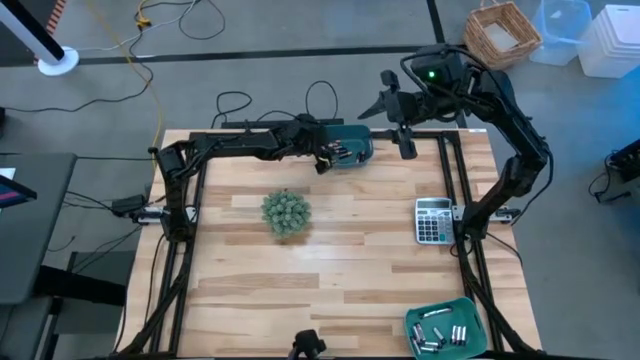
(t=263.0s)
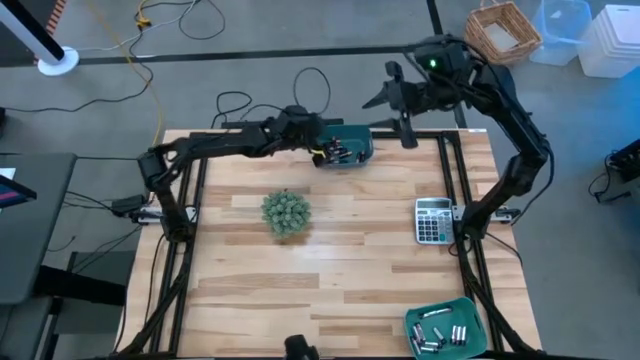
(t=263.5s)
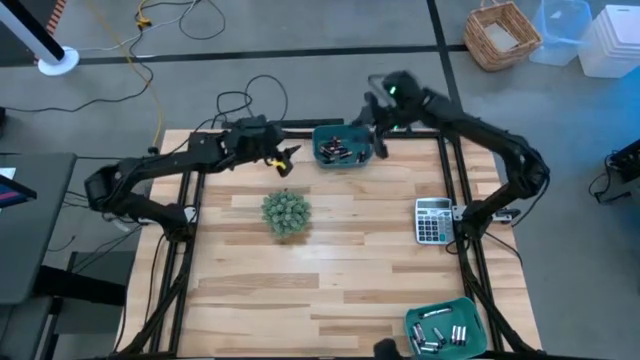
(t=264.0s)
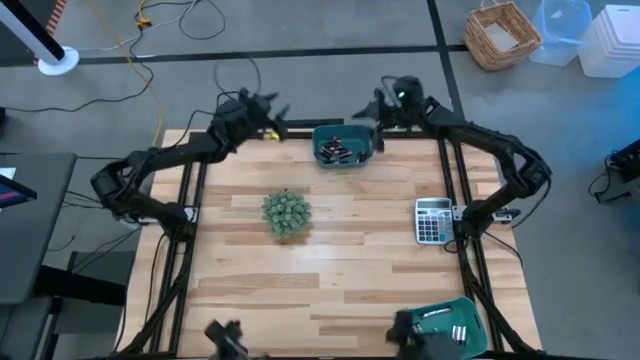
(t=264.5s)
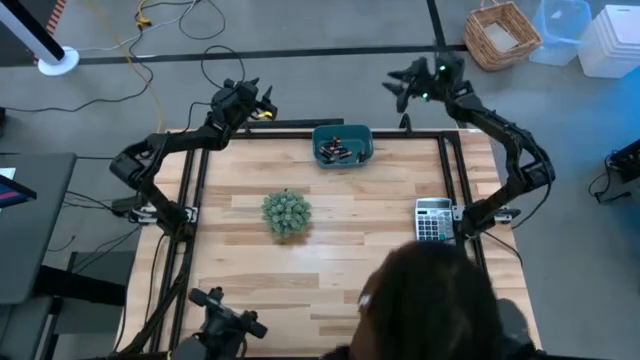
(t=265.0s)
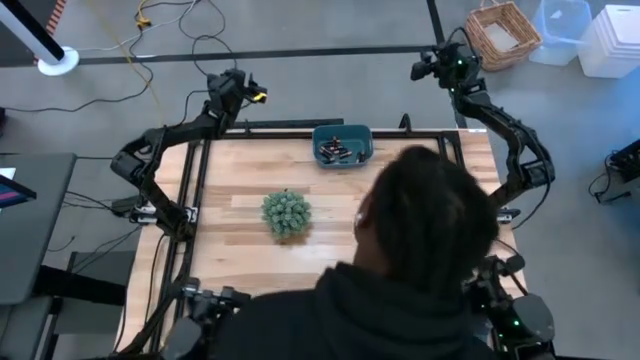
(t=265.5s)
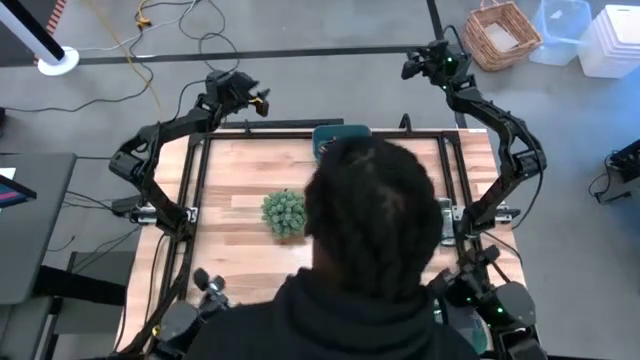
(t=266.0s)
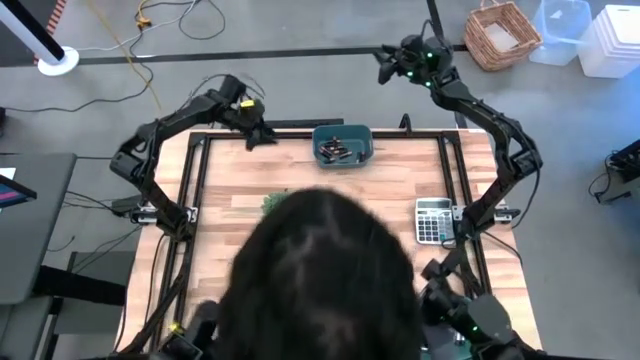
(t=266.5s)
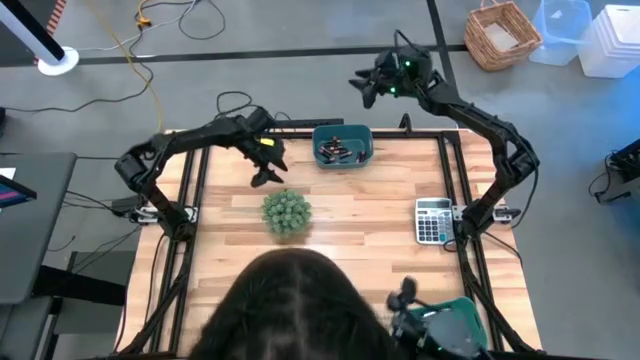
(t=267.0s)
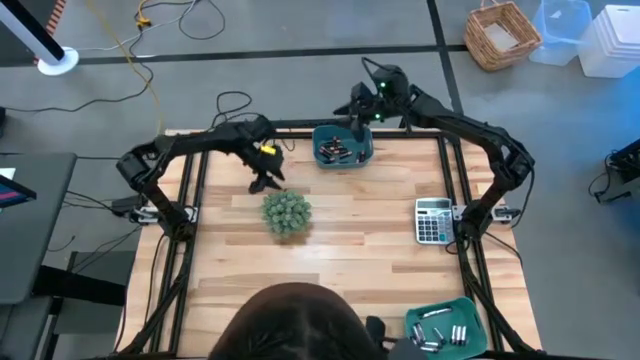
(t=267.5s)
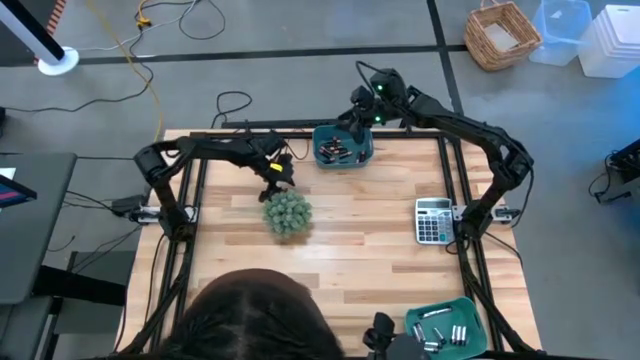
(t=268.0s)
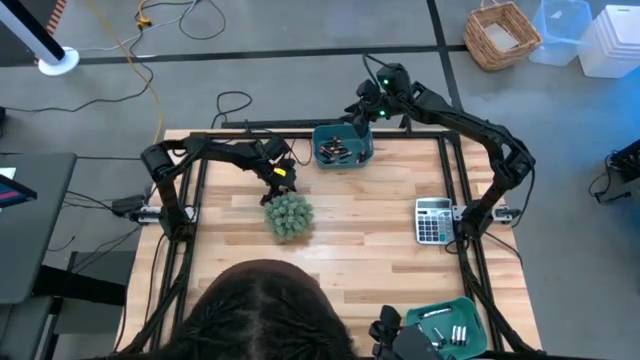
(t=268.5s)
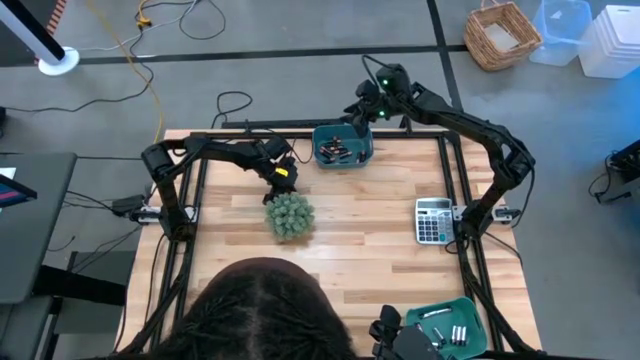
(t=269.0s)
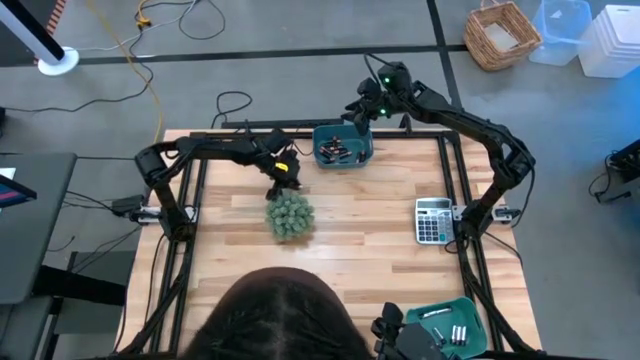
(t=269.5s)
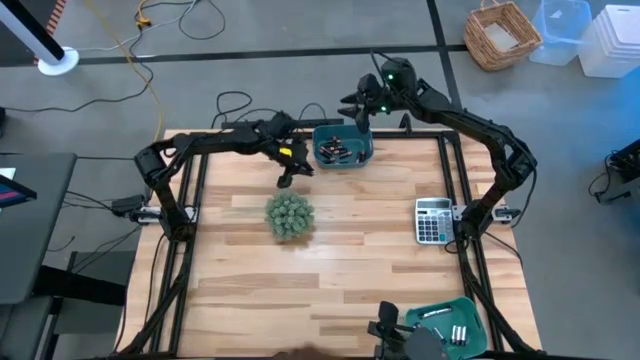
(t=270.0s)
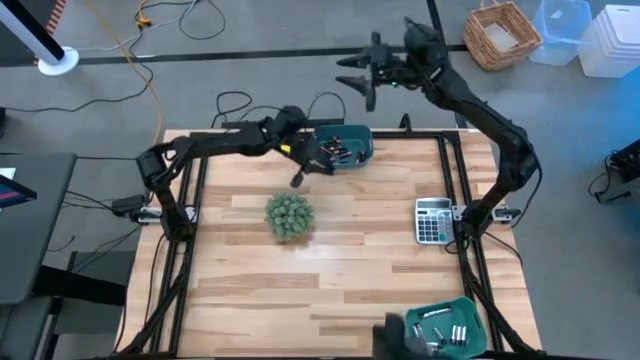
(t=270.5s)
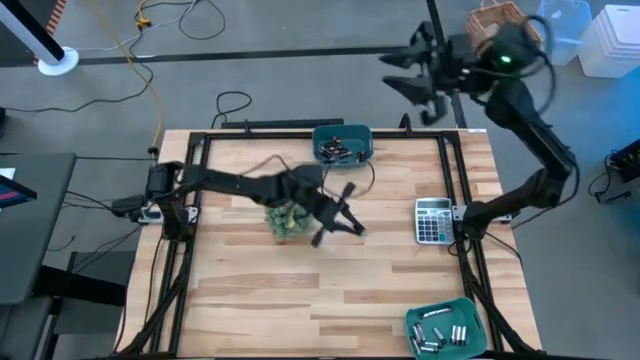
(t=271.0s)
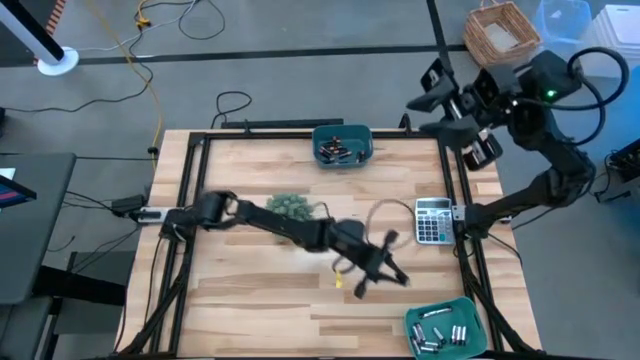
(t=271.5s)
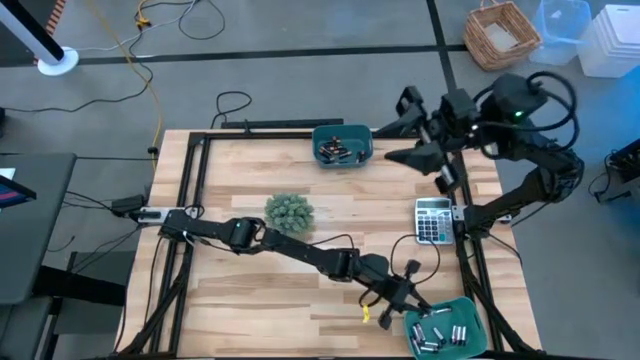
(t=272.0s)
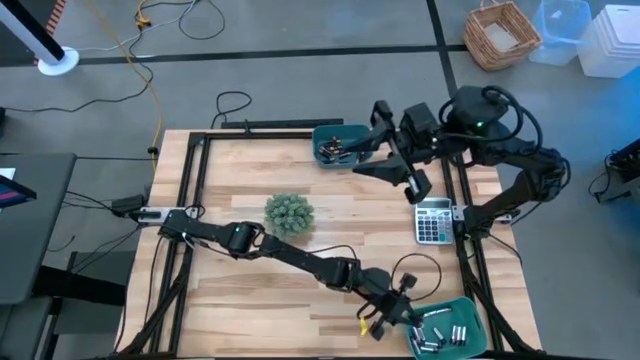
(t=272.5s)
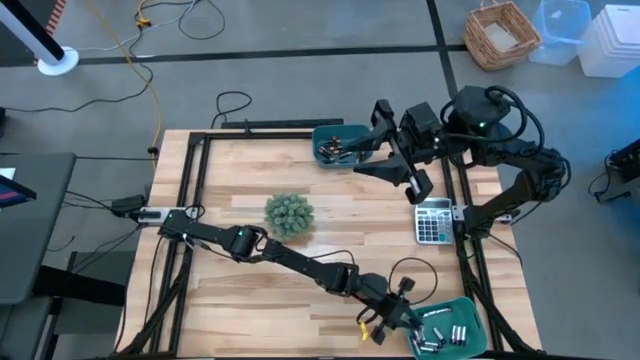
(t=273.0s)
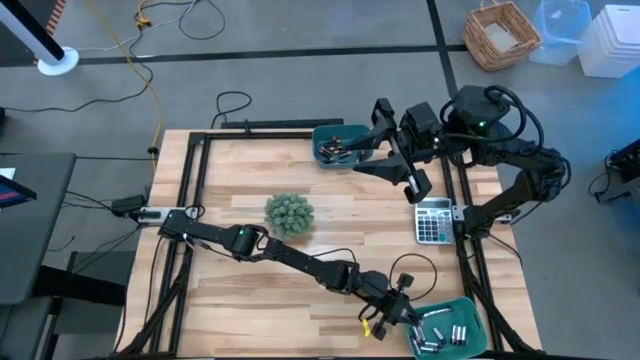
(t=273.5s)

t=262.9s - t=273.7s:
Task: Sort batteries
Put the silver battery into the green bin

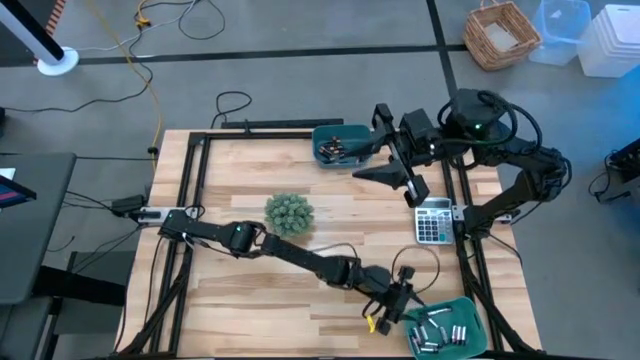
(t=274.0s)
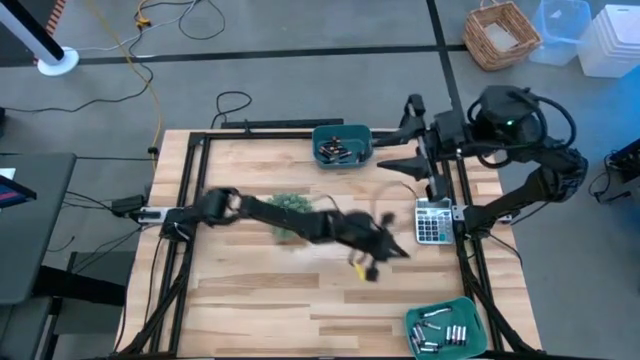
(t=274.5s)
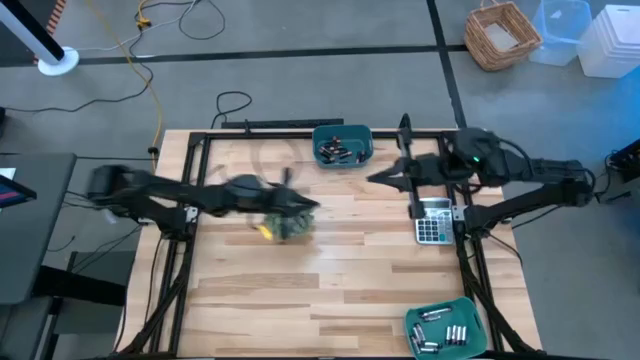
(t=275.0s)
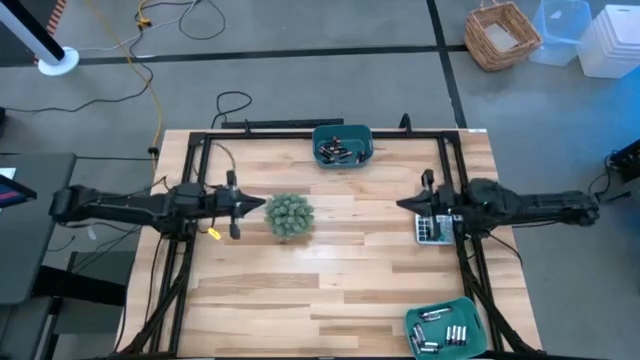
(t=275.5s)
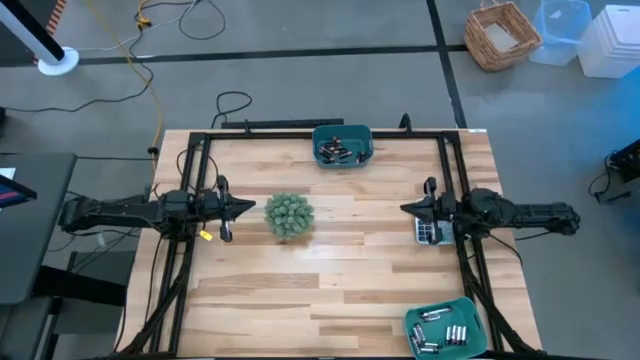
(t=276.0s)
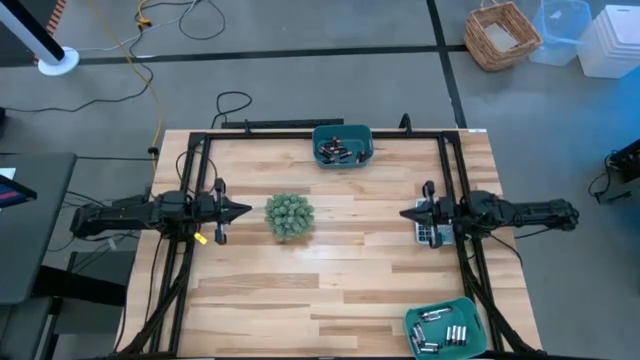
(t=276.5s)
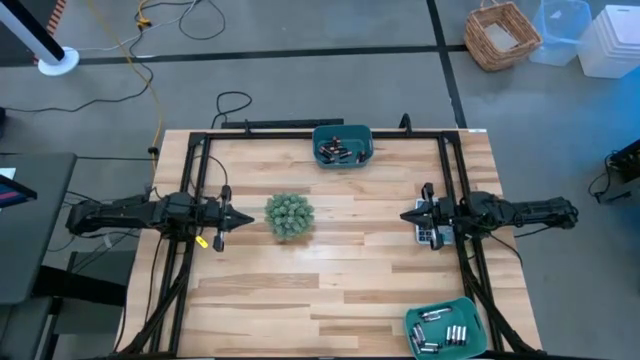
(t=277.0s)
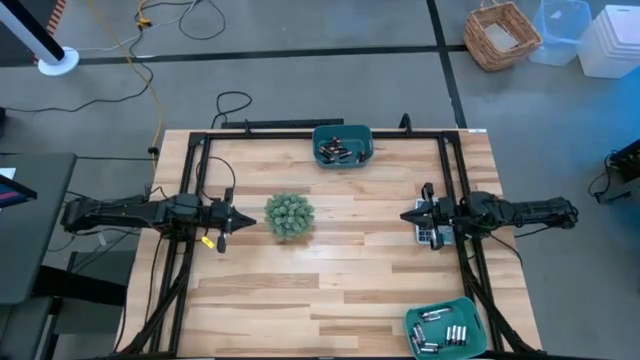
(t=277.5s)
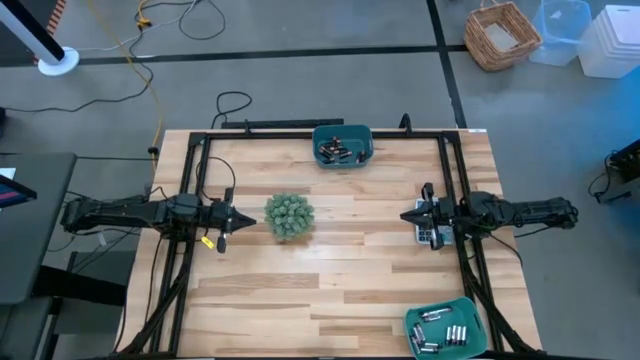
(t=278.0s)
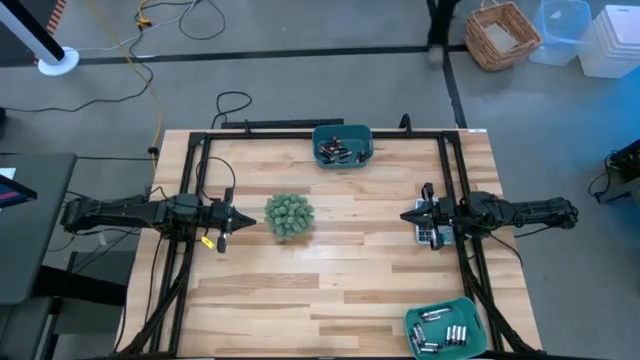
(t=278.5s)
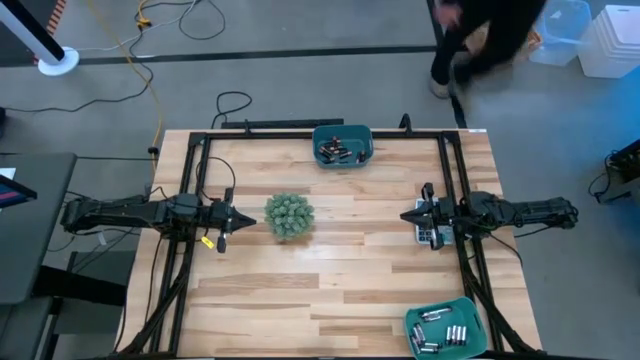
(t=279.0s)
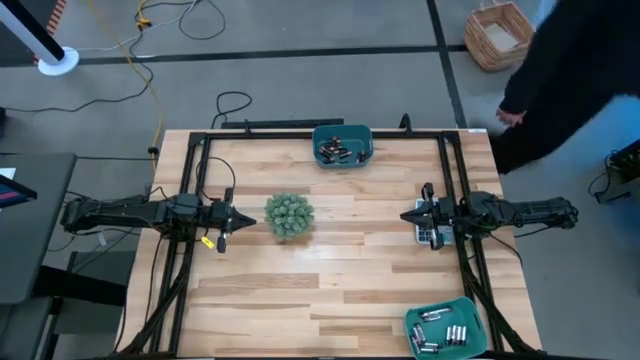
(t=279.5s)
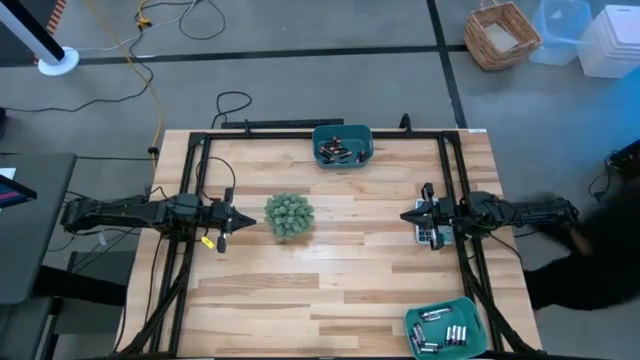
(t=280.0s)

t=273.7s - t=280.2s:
Return to Home Position

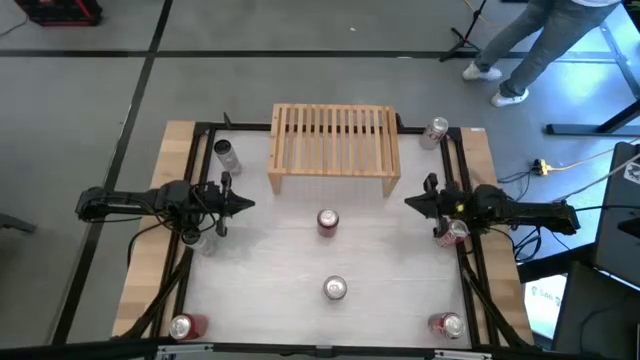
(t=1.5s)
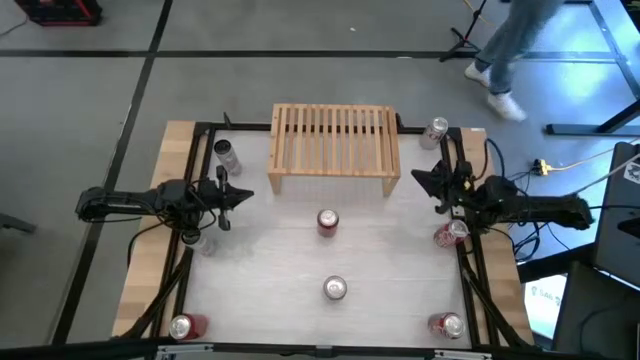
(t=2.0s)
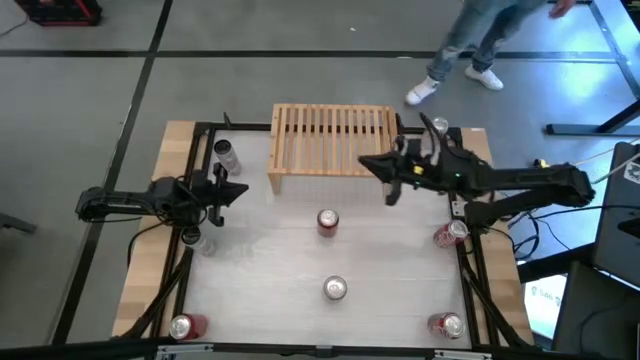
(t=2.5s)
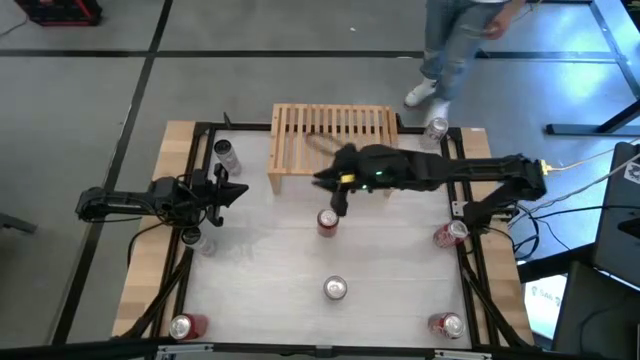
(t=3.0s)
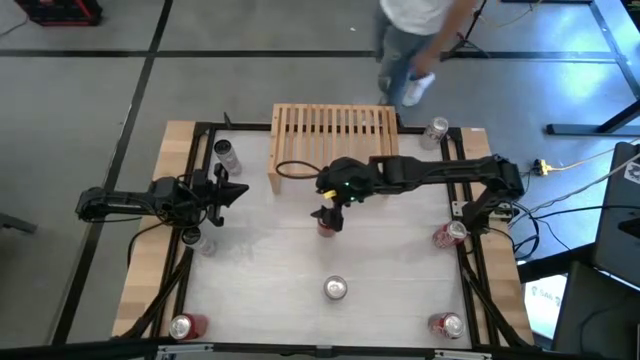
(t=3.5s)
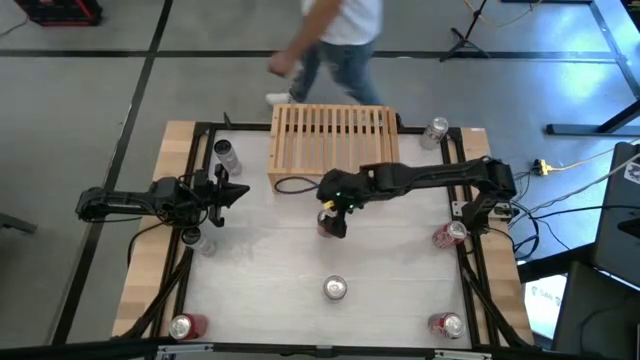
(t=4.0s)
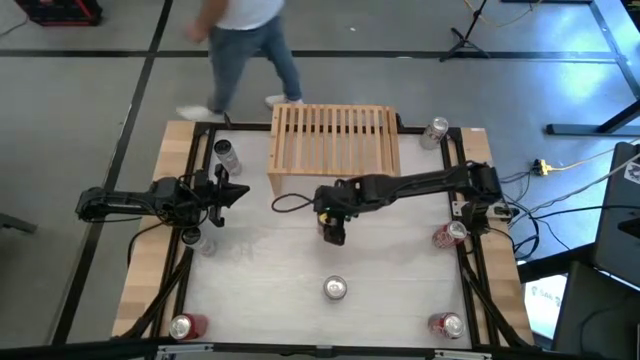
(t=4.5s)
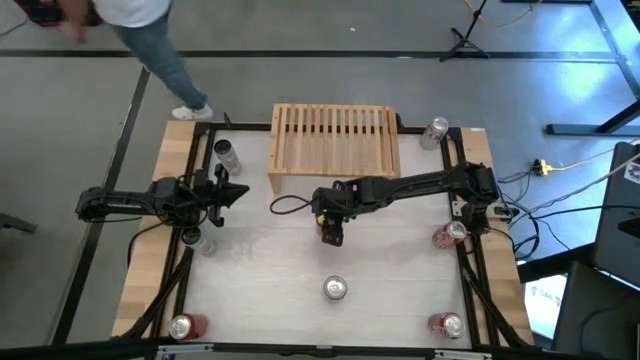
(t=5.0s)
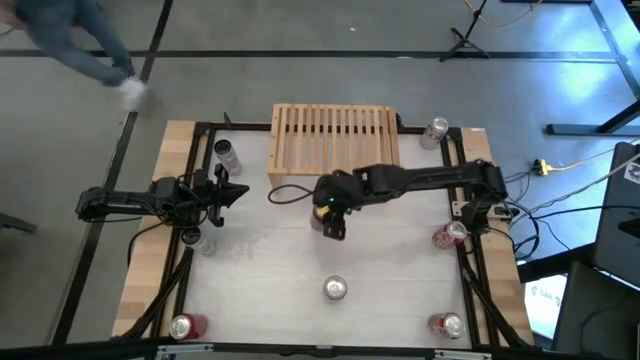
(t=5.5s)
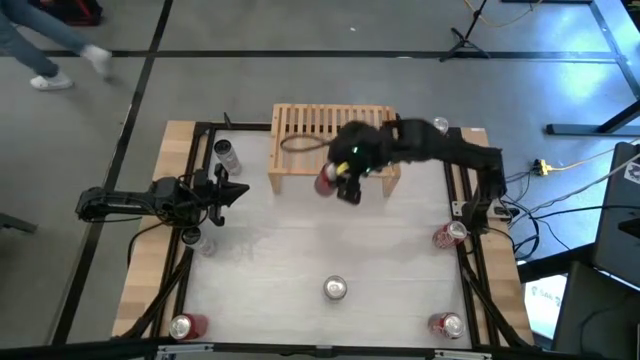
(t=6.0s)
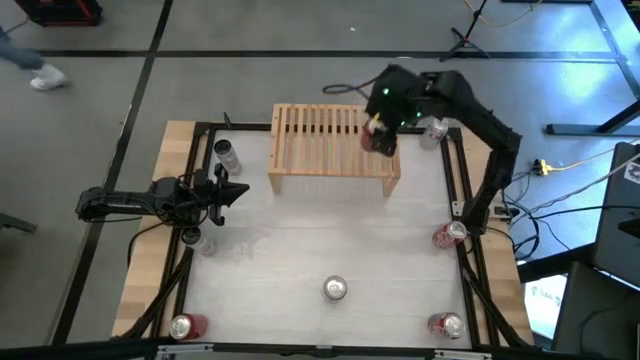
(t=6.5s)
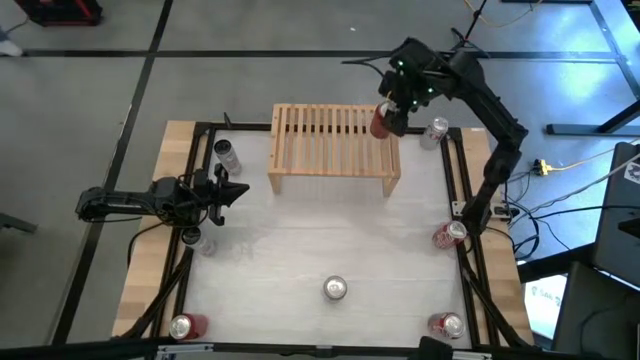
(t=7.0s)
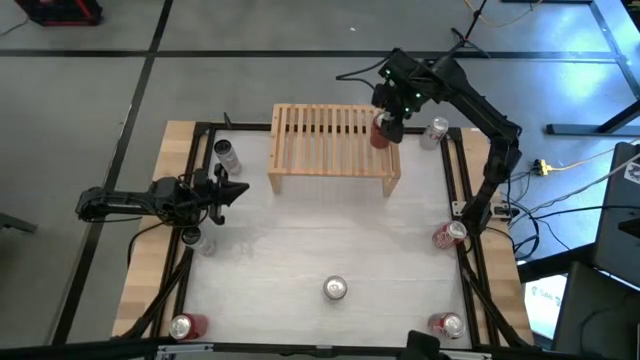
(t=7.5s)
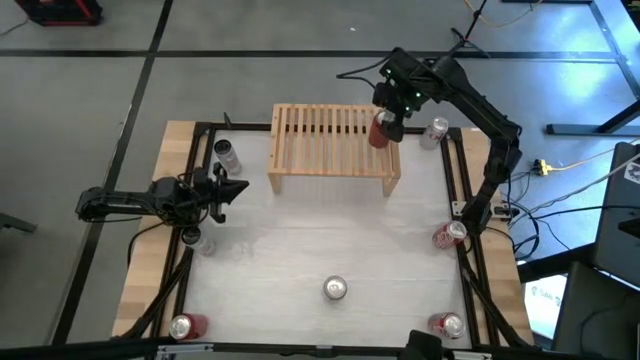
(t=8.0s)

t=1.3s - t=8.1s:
Task: Place canned beverage on shelf
Put the top red and black soda can on the shelf
